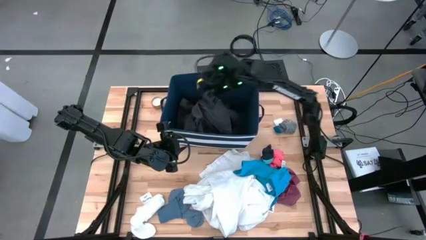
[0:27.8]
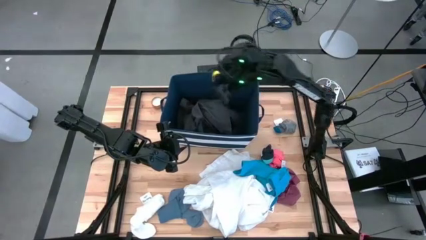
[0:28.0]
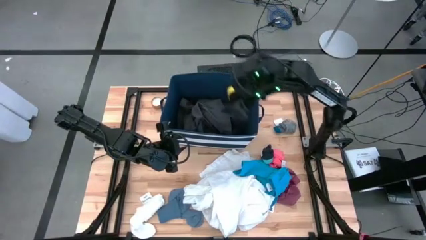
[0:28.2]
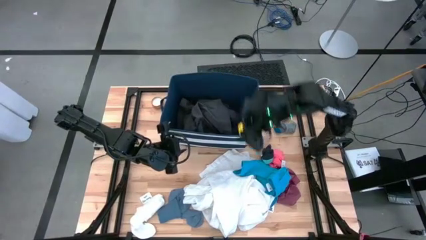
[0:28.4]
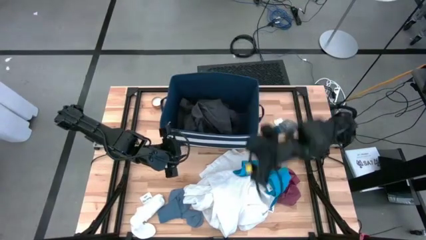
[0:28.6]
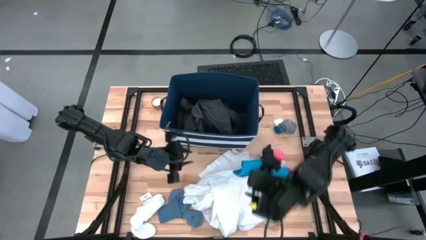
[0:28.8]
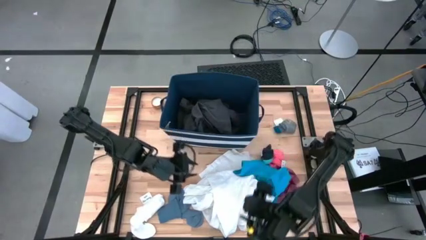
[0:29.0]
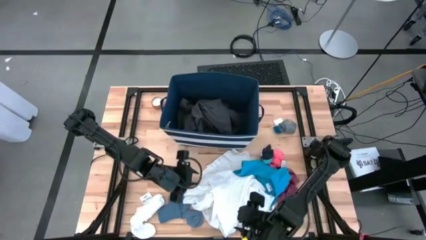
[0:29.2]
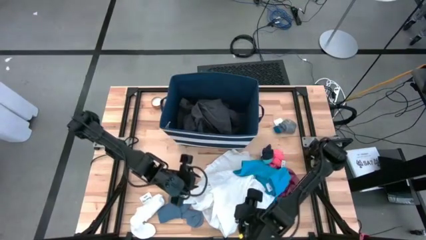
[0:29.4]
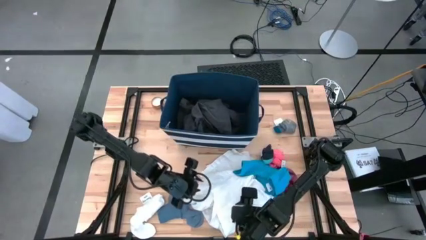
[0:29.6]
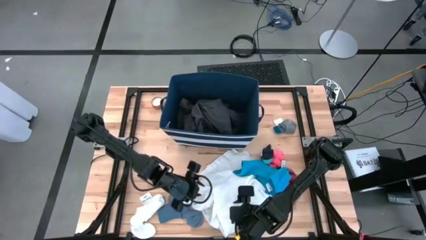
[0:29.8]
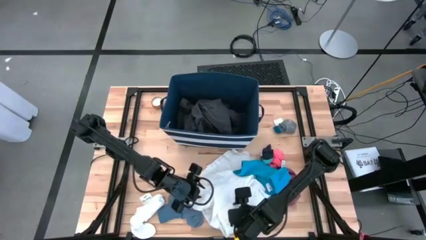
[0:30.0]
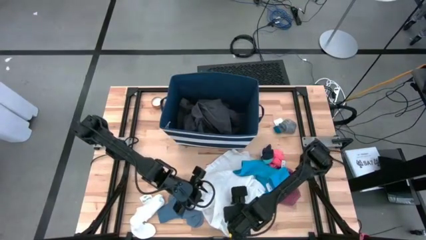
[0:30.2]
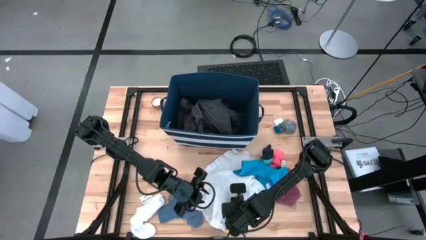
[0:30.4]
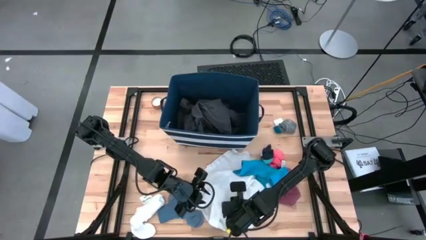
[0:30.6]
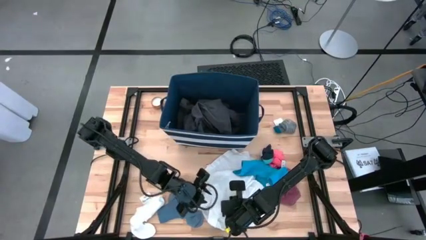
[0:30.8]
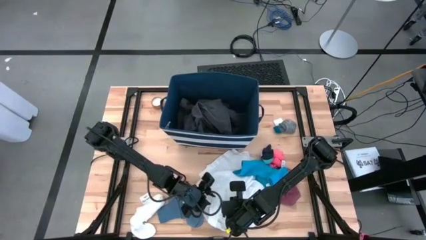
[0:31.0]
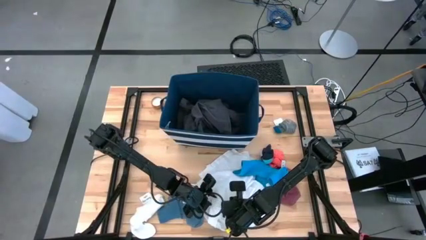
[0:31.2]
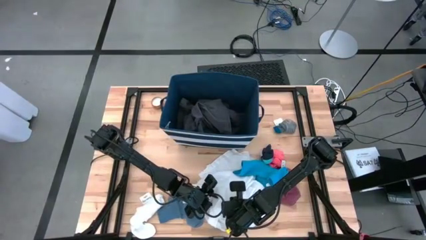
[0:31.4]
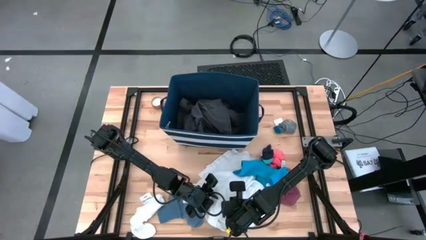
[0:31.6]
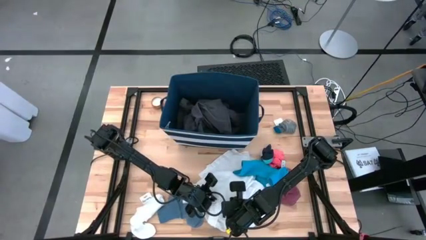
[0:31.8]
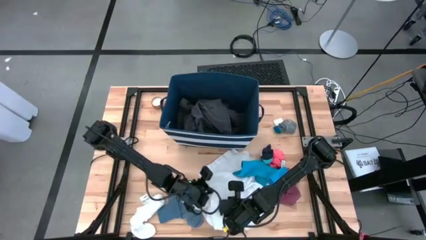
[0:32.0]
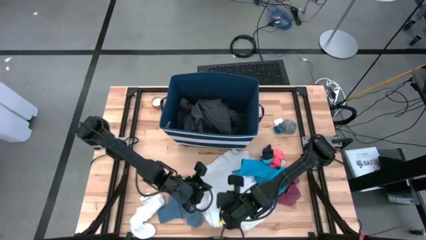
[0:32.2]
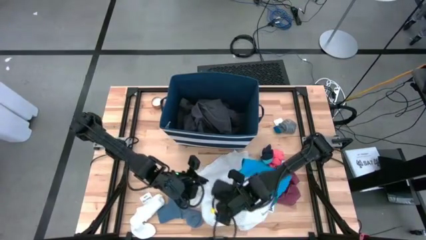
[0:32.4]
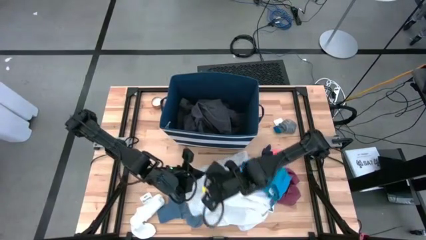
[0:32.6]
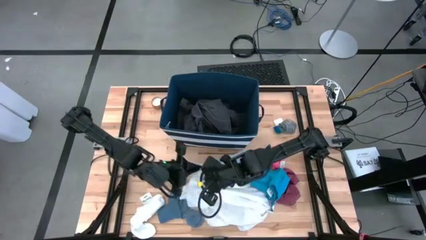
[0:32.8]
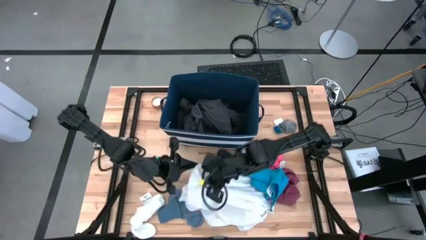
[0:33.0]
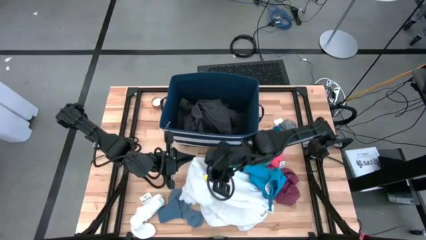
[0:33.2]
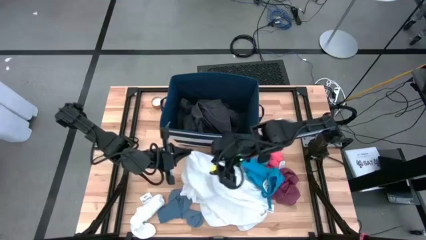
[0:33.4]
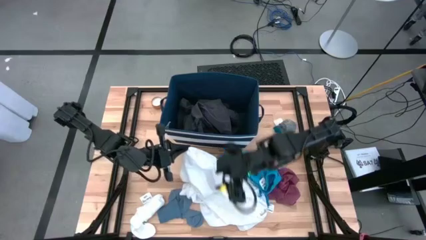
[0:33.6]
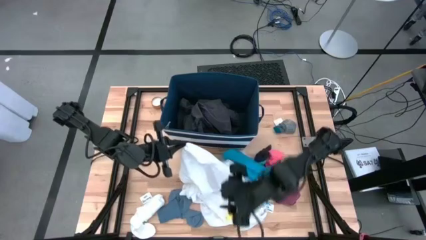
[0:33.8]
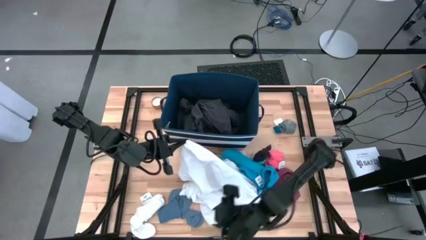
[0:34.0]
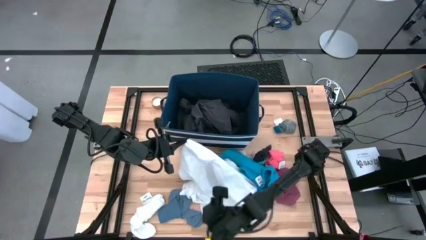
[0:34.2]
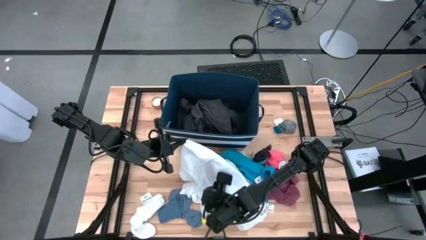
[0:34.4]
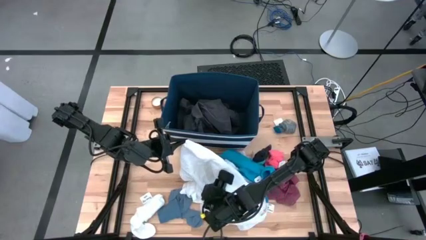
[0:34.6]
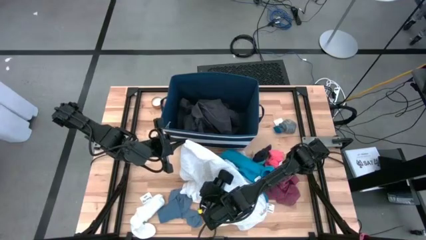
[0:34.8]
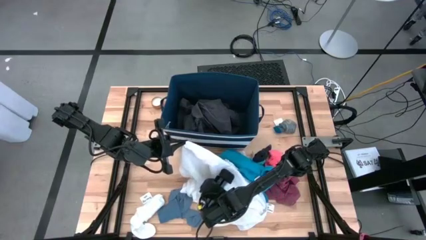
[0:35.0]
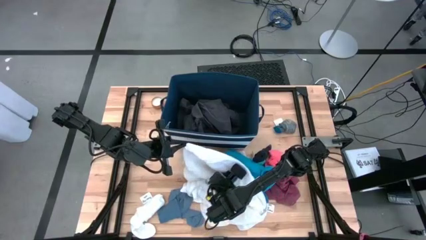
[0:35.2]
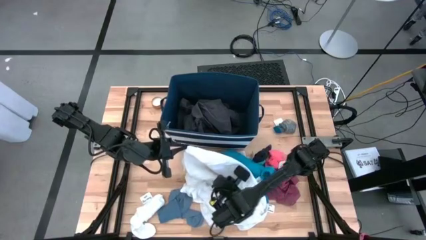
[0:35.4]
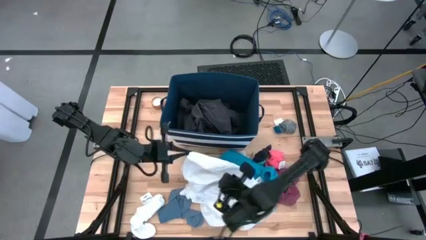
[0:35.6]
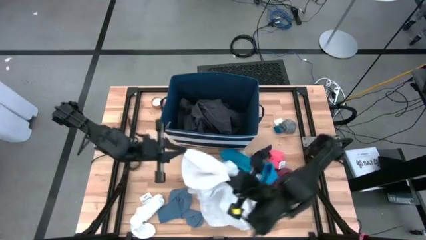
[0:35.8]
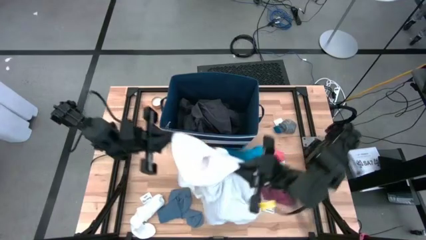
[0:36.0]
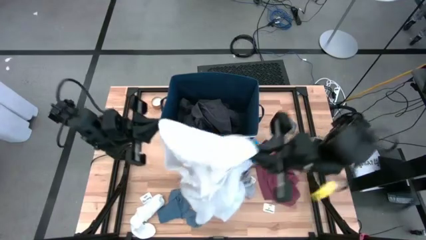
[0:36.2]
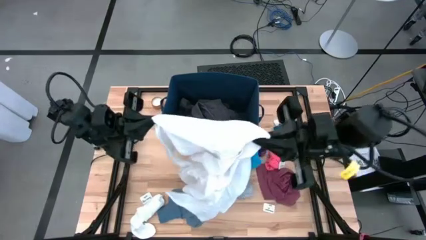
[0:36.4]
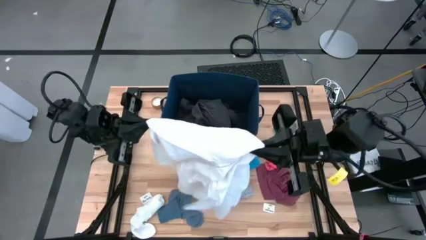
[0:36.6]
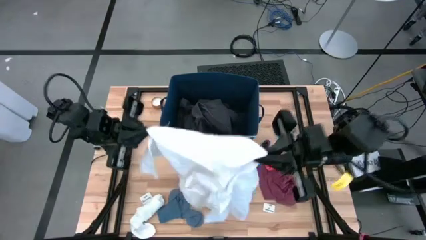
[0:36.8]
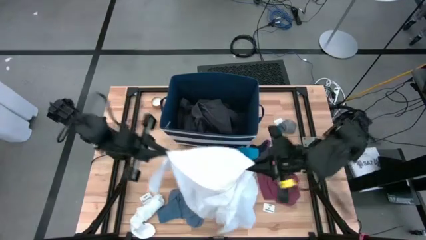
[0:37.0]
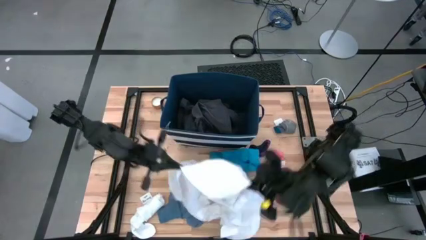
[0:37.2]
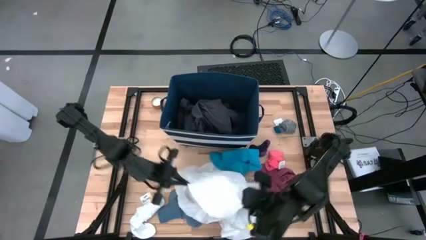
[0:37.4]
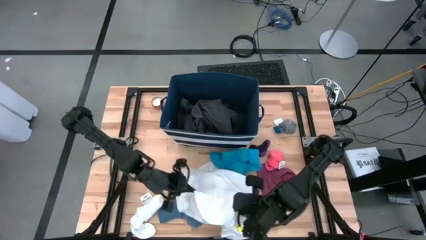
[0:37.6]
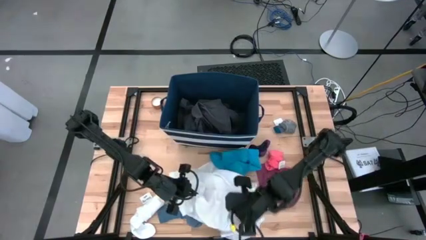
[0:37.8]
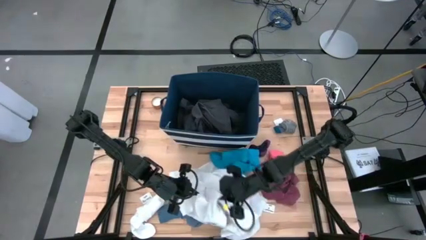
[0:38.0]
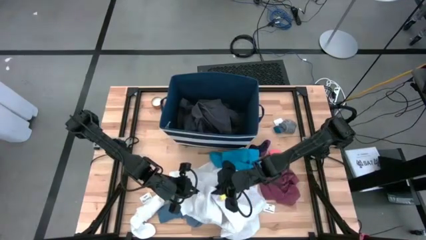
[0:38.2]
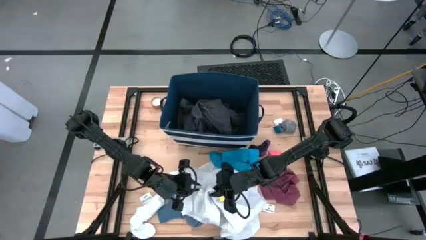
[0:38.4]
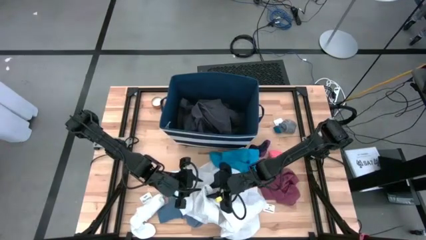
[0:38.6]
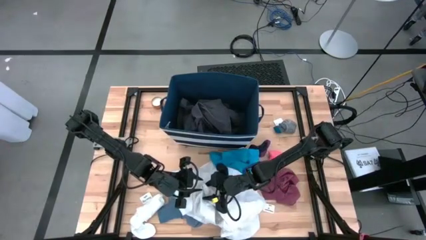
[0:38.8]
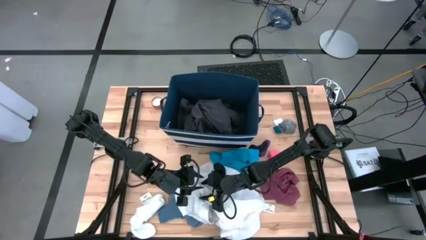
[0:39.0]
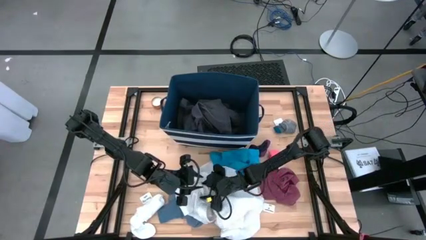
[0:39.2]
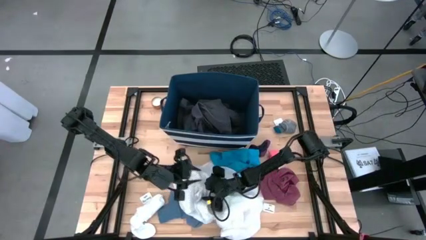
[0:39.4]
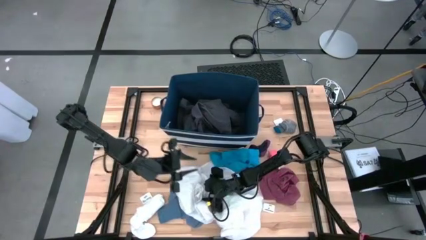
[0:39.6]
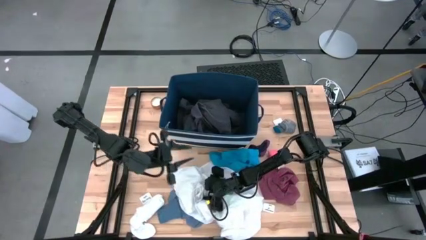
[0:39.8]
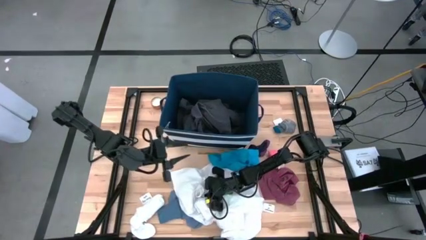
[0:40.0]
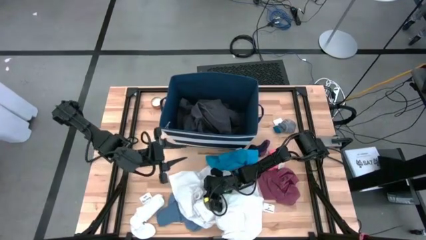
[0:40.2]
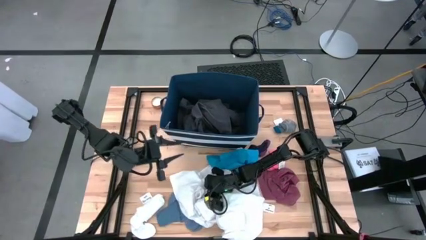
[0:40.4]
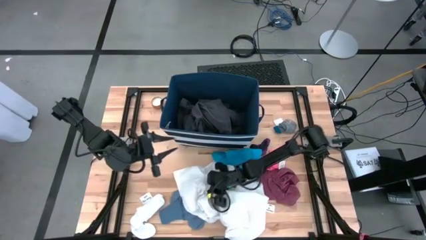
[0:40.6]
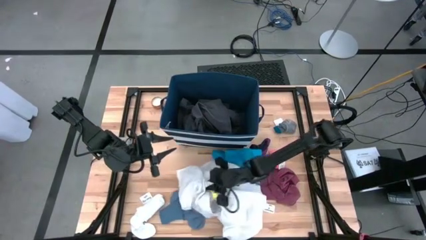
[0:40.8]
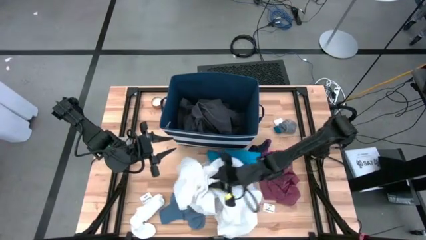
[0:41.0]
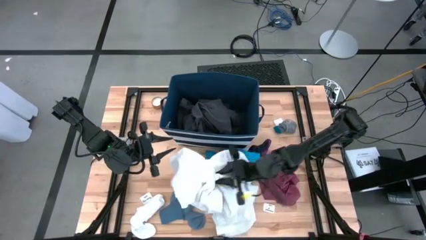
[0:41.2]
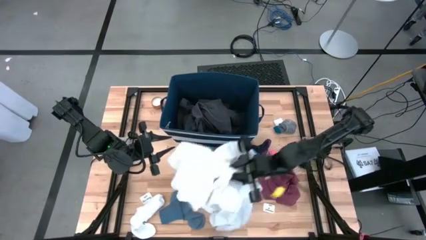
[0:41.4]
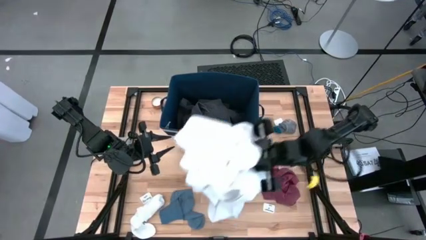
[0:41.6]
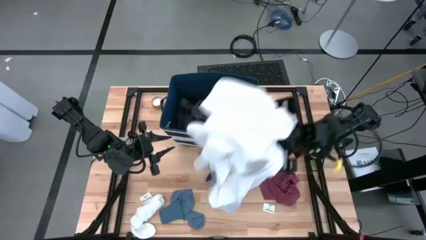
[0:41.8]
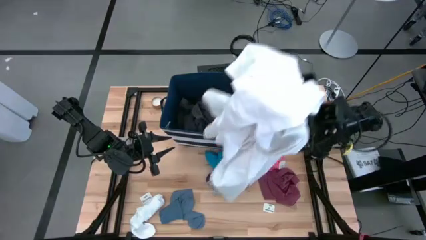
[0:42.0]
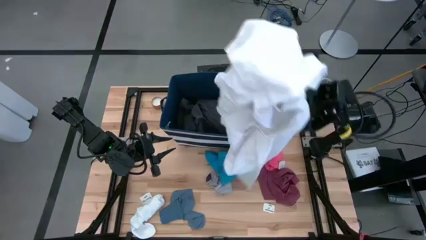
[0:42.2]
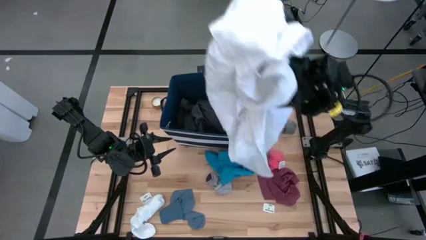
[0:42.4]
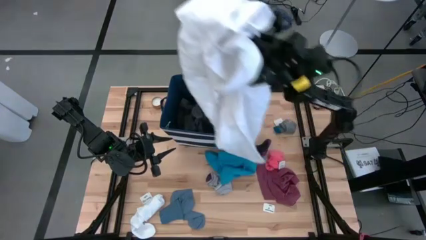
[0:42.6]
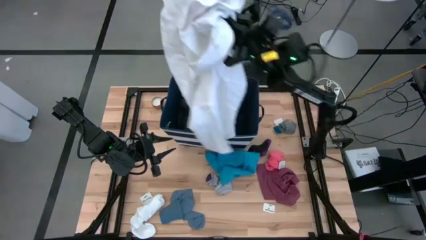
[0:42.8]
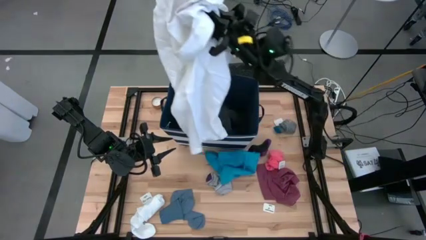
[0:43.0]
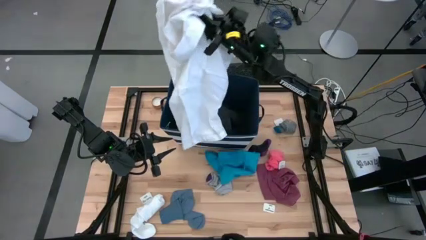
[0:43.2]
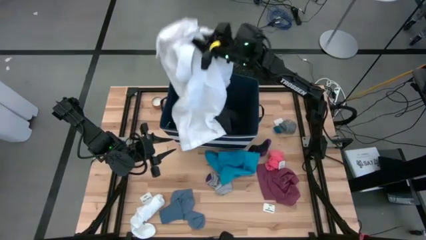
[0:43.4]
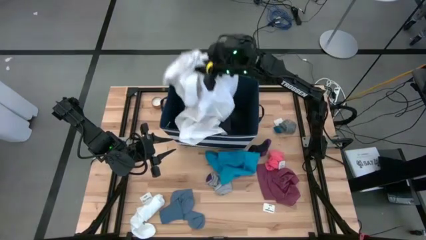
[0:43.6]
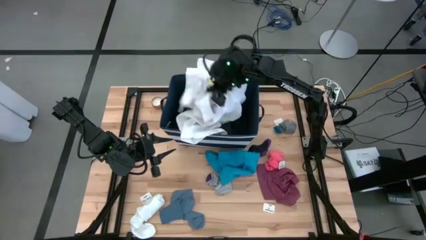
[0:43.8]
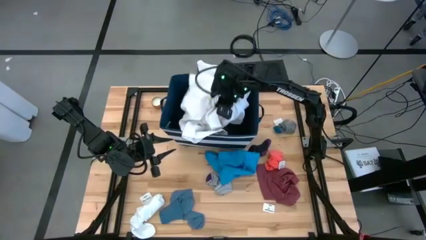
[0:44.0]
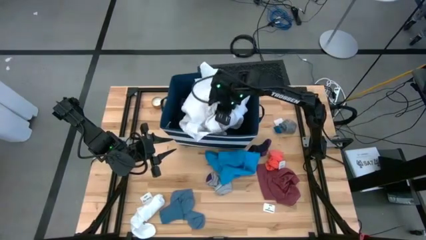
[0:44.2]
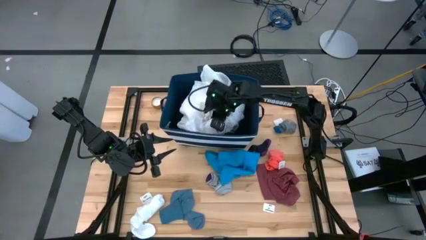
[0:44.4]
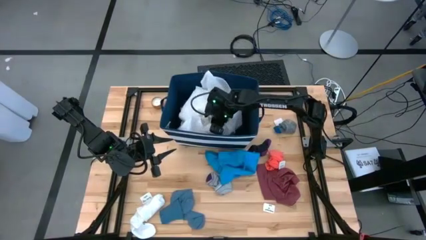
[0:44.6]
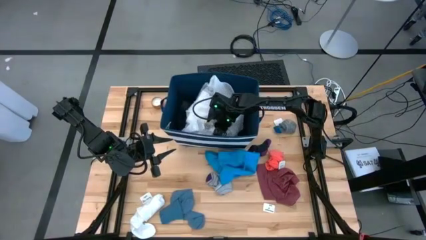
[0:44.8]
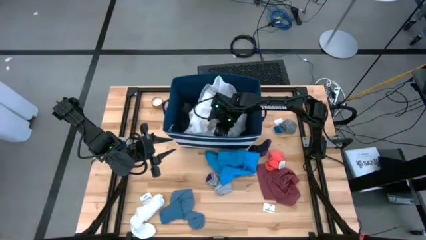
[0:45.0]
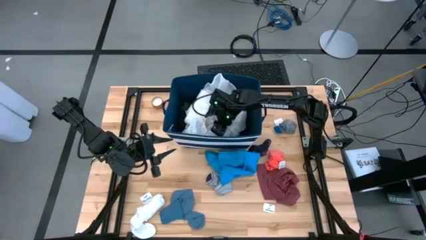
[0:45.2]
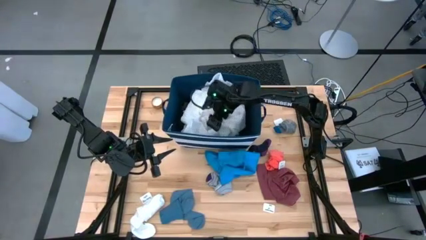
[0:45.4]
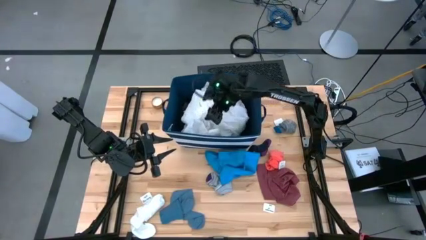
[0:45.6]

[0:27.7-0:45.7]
Task: Sort clothes
Put the white polo shirt into the white and blue laundry organizer
